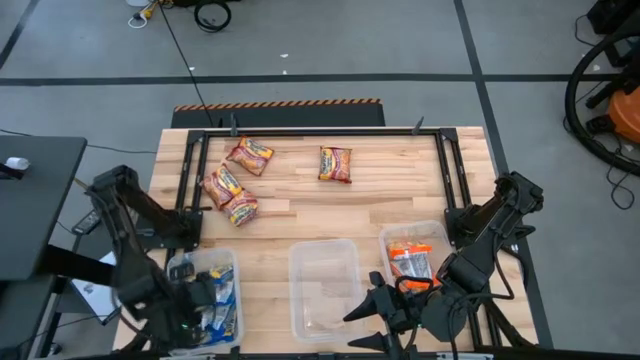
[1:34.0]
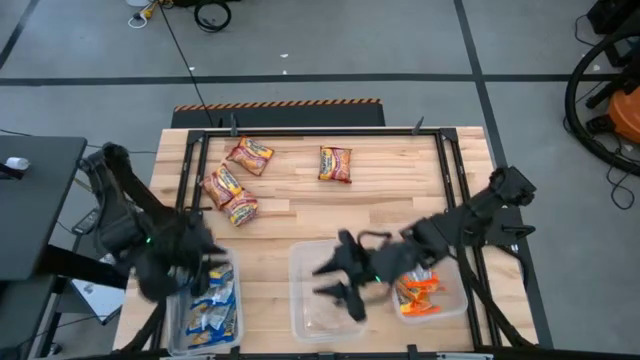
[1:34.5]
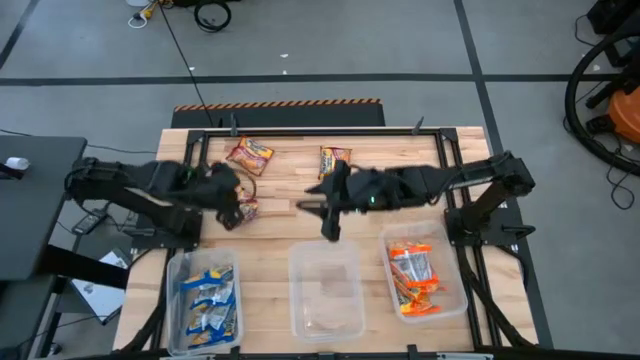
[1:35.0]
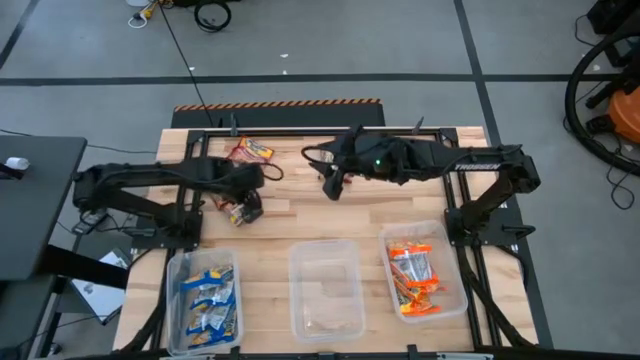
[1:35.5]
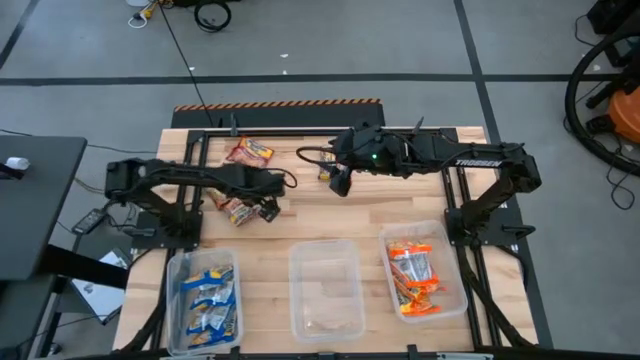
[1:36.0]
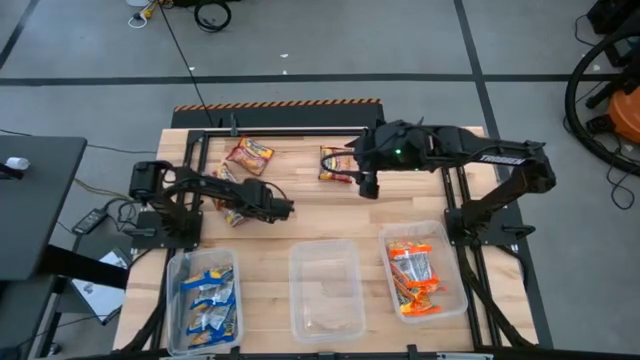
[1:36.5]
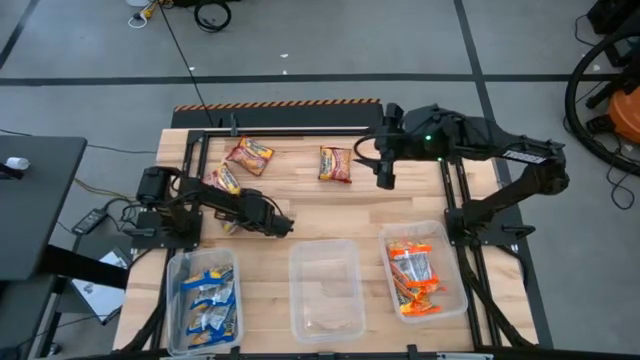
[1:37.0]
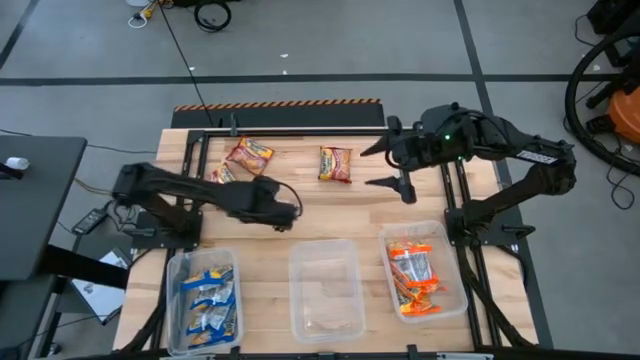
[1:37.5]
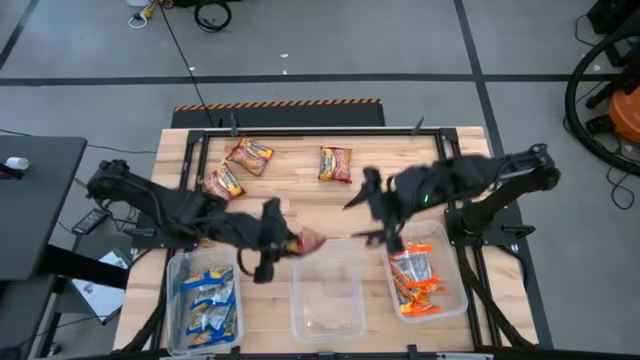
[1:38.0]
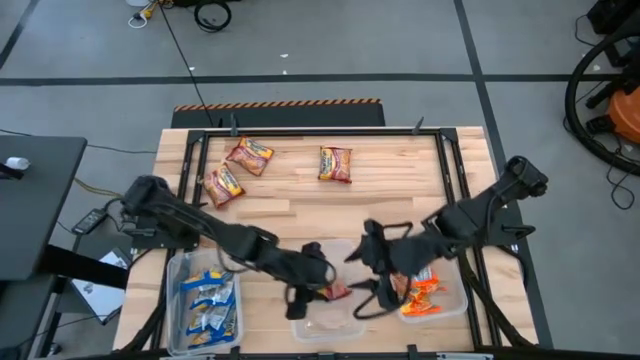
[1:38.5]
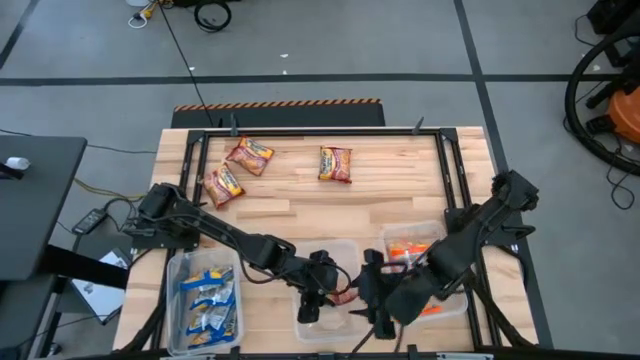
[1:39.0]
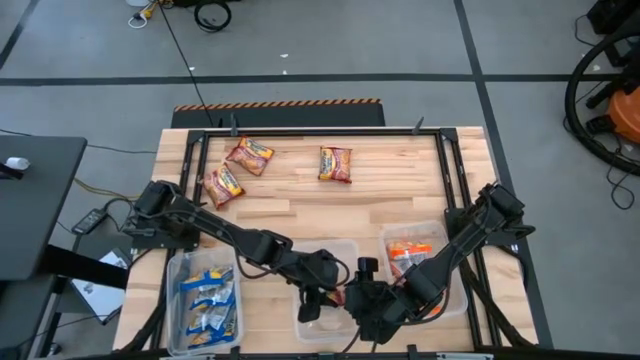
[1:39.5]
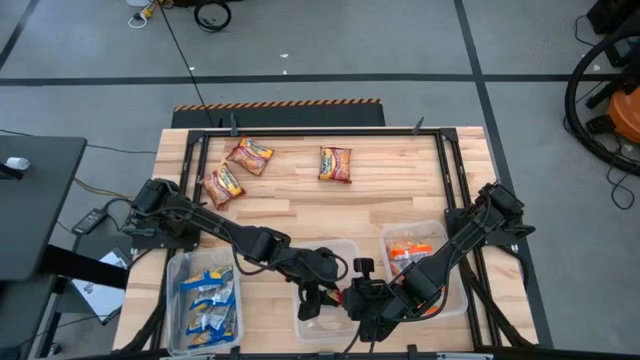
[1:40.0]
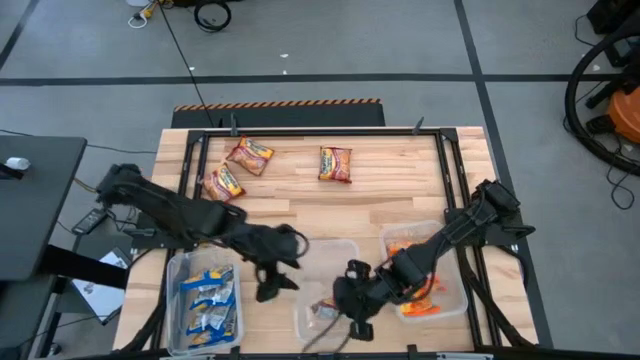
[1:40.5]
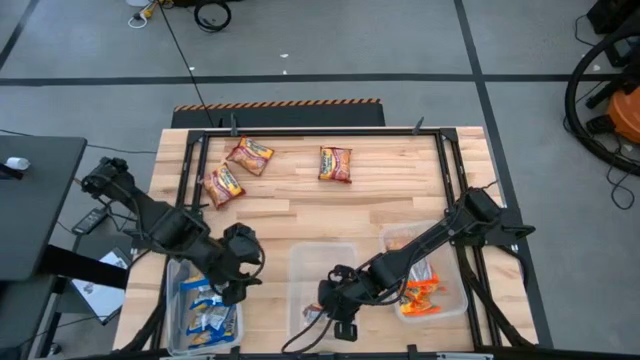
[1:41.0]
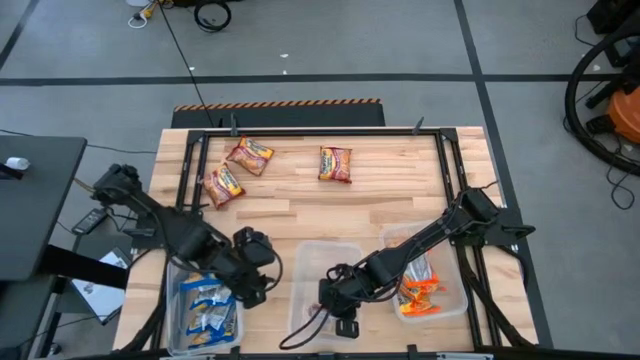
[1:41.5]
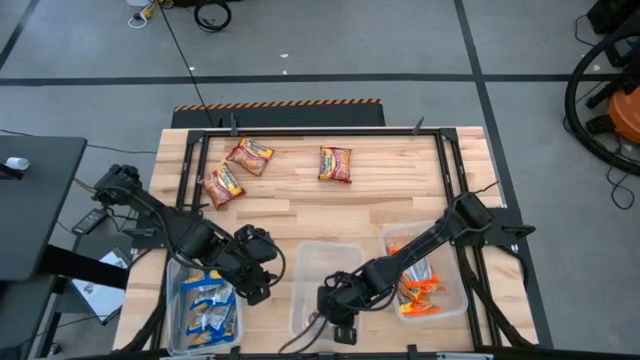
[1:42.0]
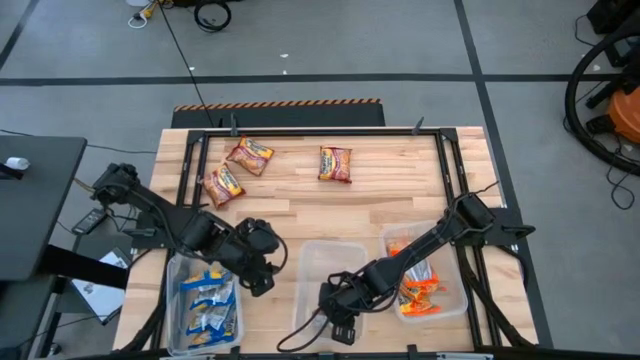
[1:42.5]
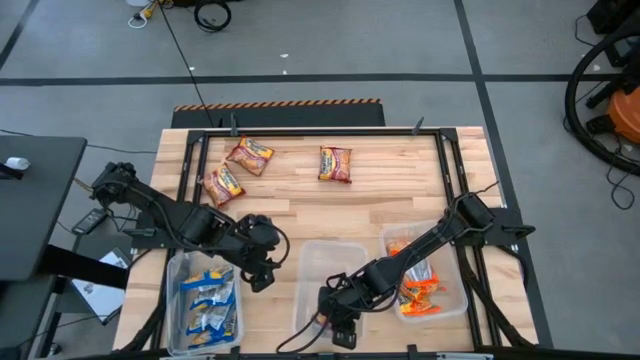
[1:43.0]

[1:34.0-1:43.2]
Task: Sort Maruchan noodles
Put the bottom center red noodle pack into the middle transparent bin

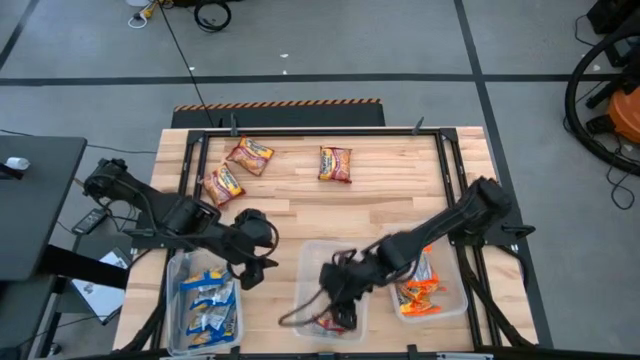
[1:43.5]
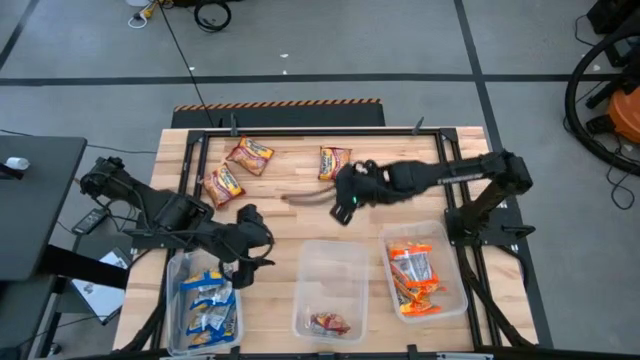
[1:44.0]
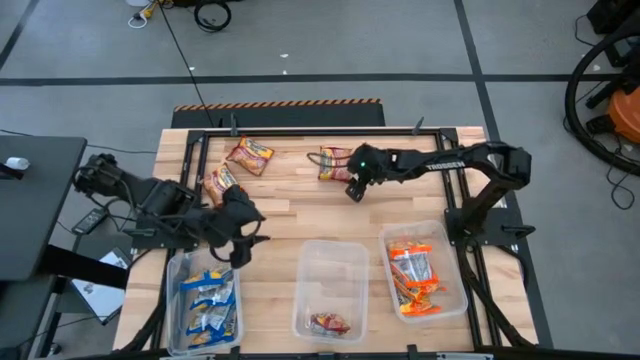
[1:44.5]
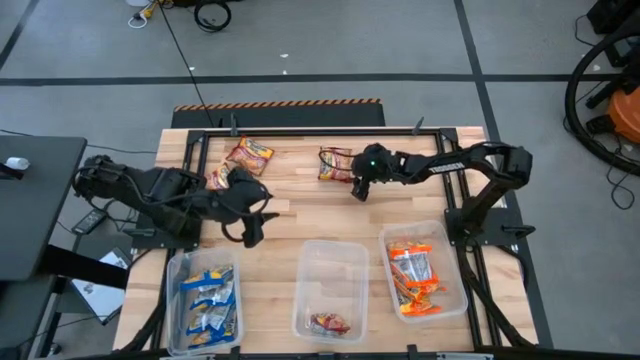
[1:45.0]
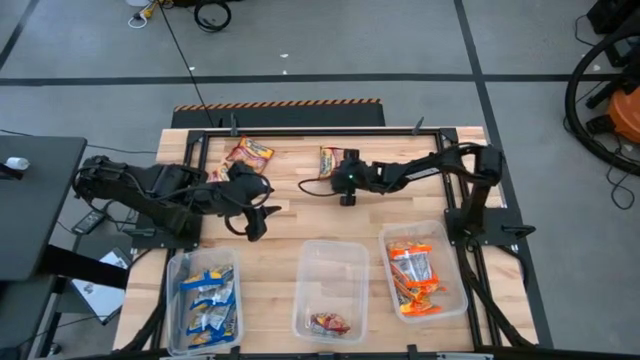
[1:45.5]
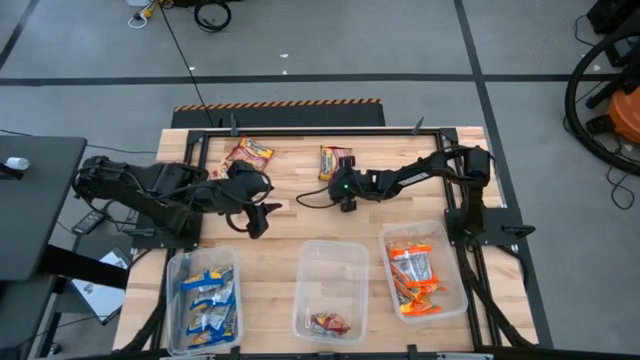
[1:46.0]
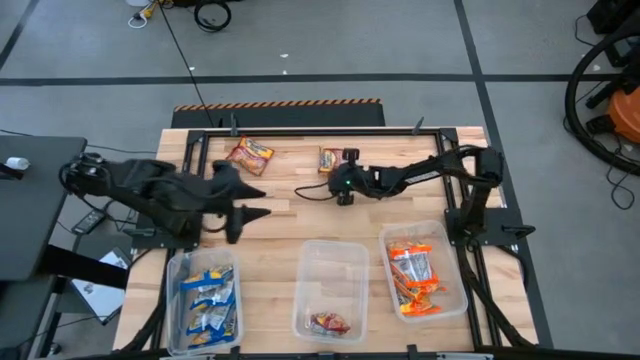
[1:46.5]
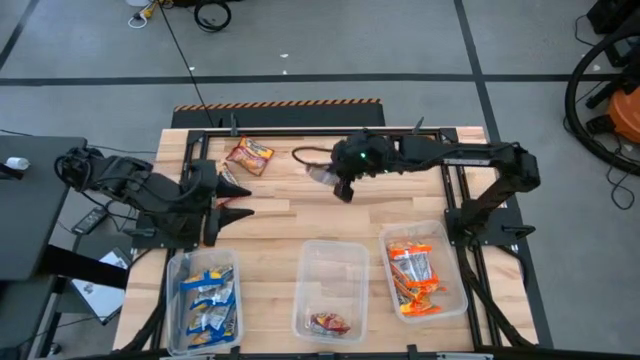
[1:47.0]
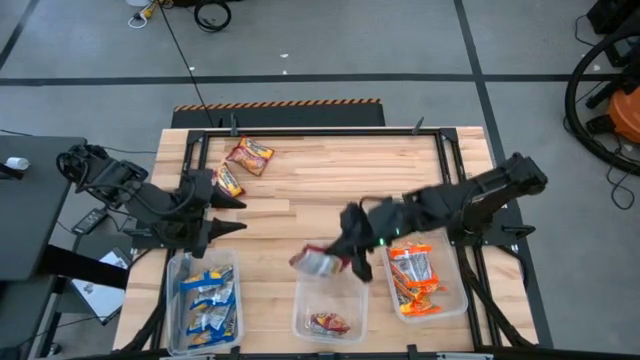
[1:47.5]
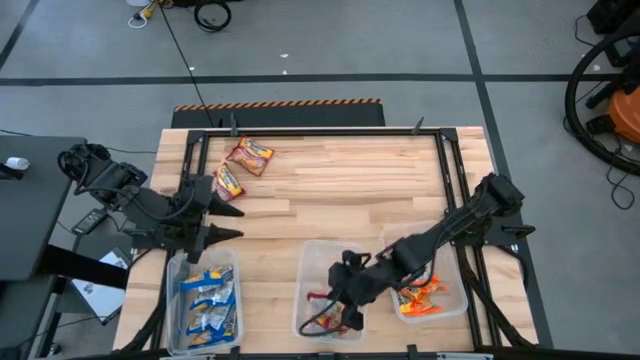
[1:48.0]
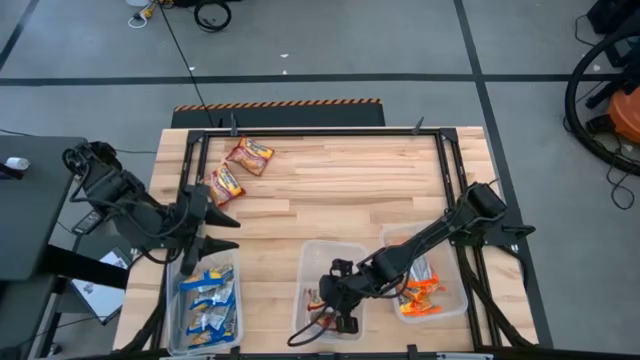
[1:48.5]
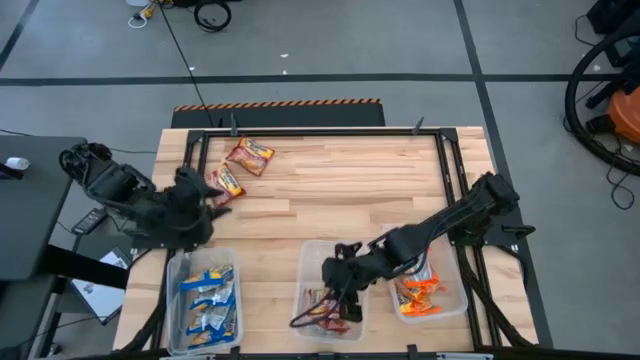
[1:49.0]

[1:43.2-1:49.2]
Put the top right red noodle pack into the middle transparent bin

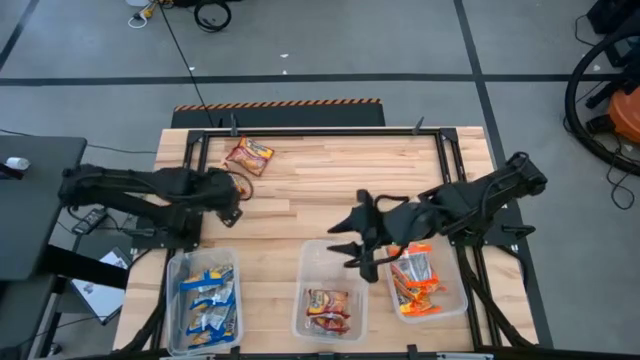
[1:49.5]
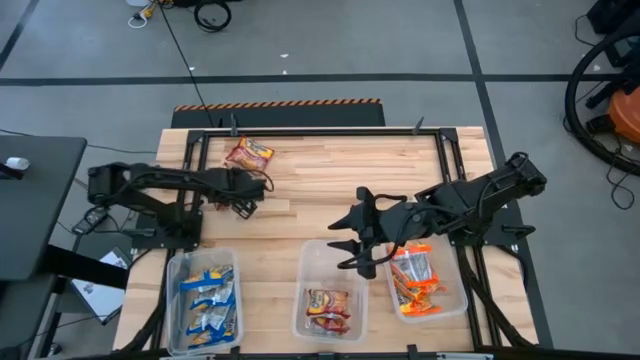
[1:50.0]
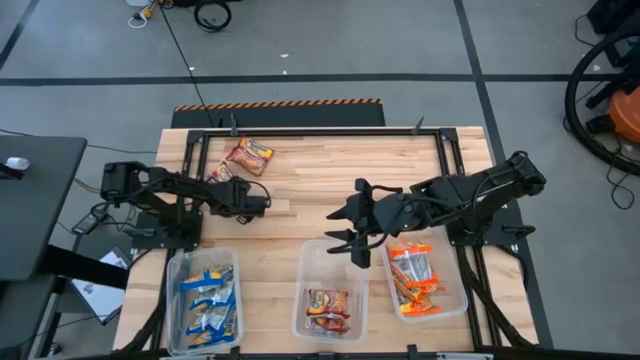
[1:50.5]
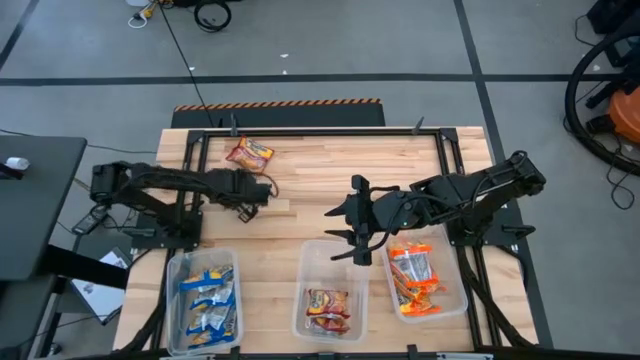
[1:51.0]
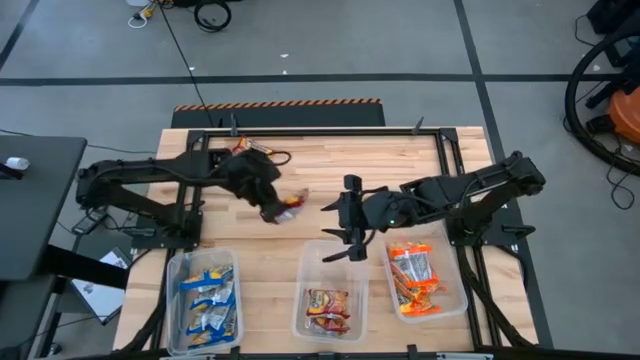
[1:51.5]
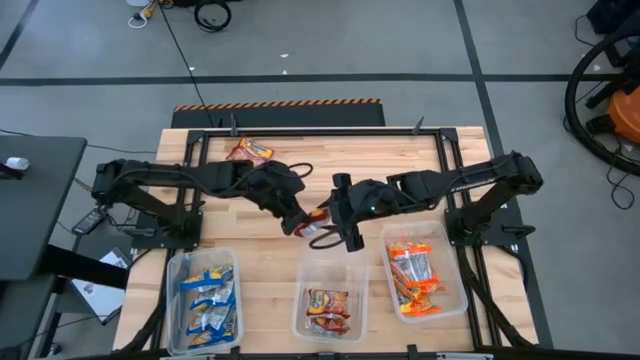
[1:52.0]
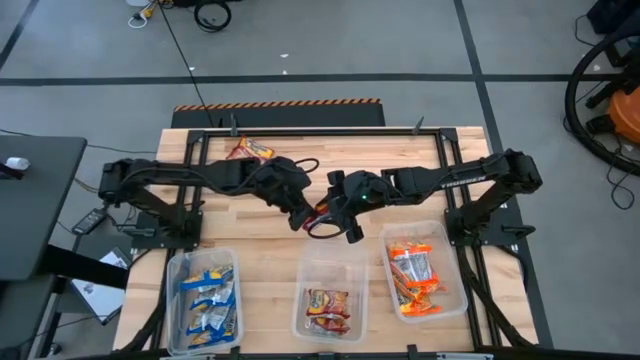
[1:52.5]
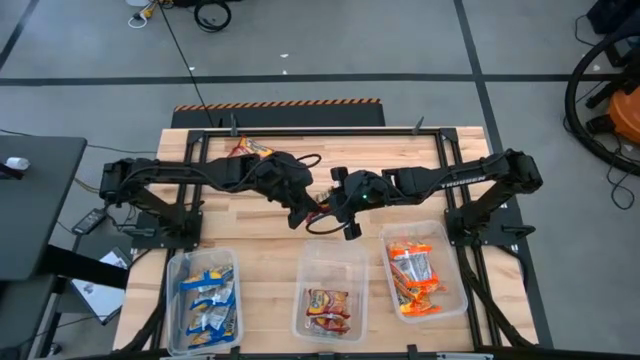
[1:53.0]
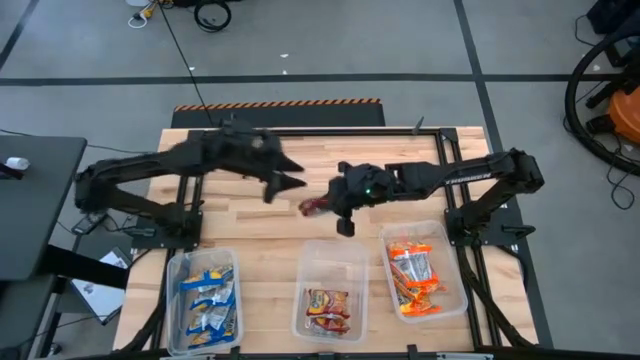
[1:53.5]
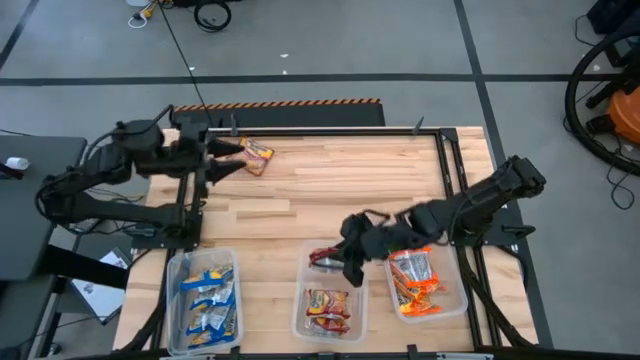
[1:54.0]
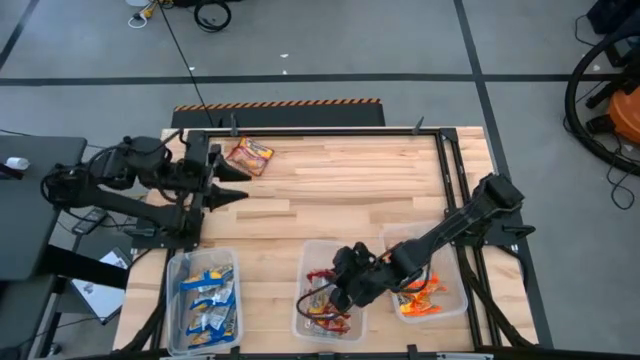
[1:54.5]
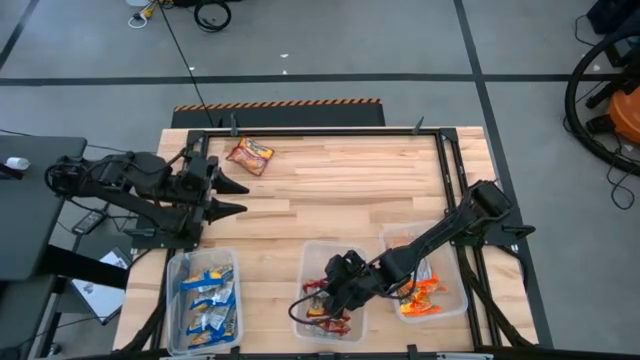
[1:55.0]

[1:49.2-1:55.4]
Put the bottom red noodle pack into the middle transparent bin

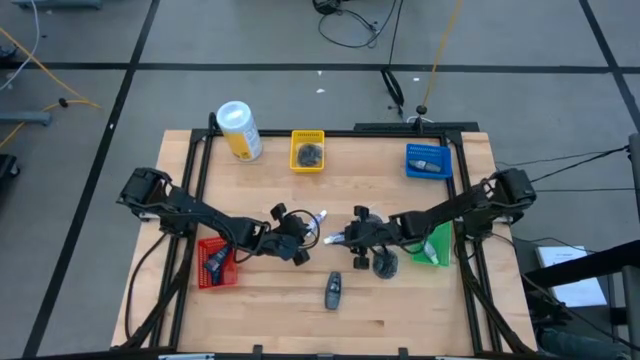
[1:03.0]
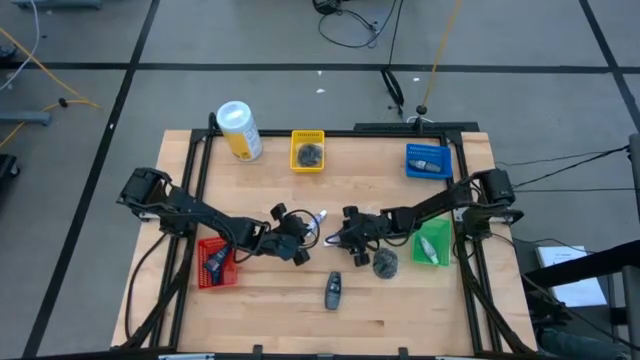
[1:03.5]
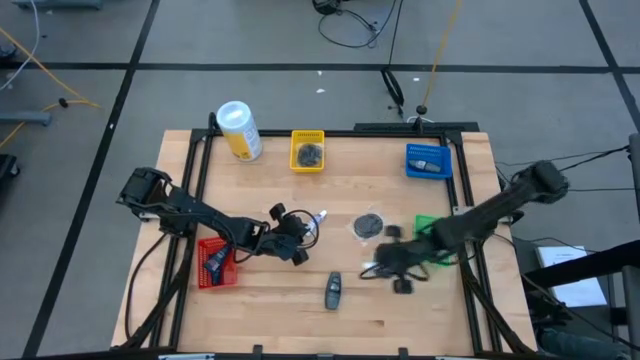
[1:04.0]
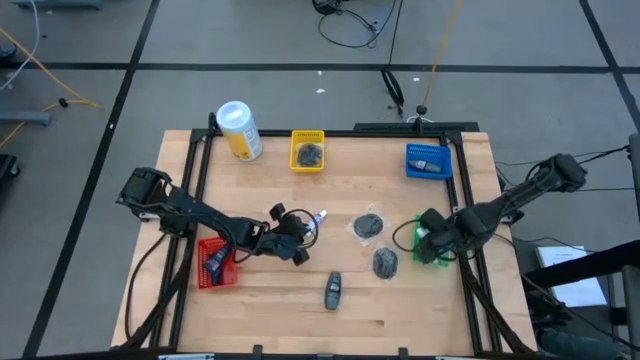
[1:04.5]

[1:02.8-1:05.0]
Task: Pick & Place Travel size toiletries
Put the toothpaste into the green bin
